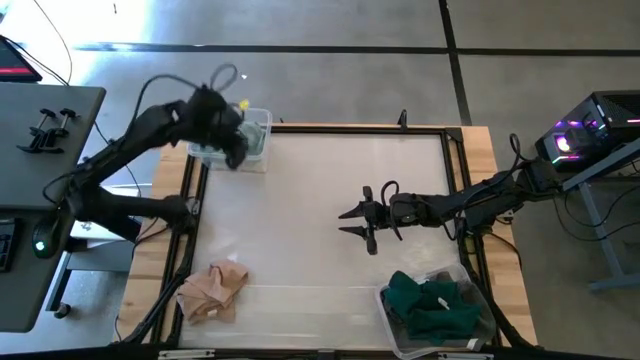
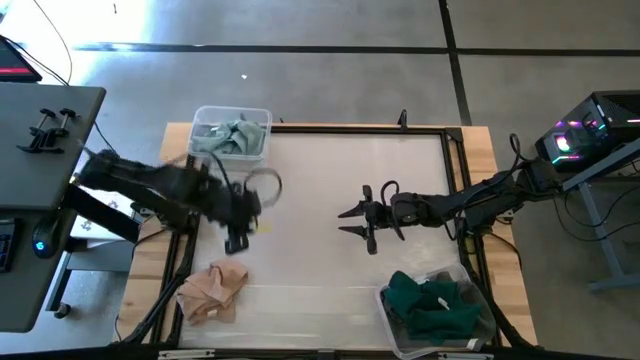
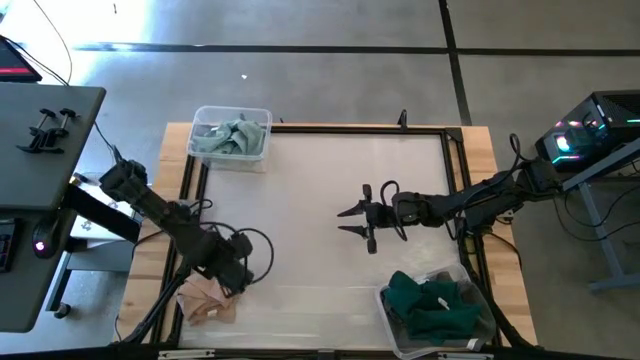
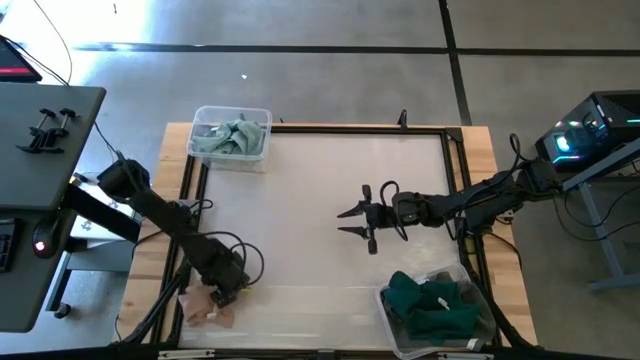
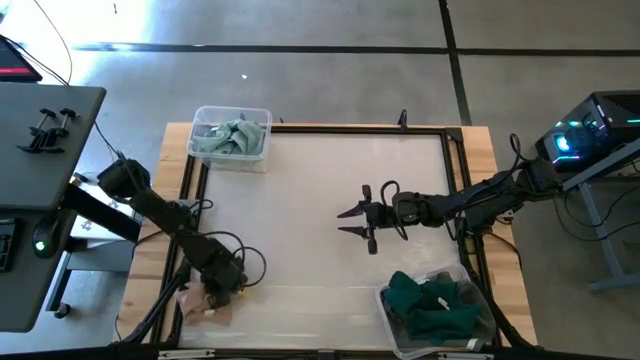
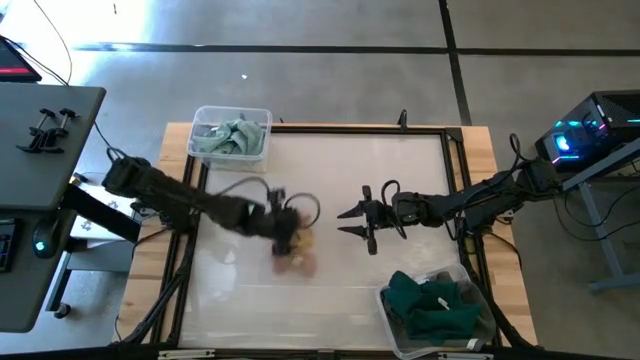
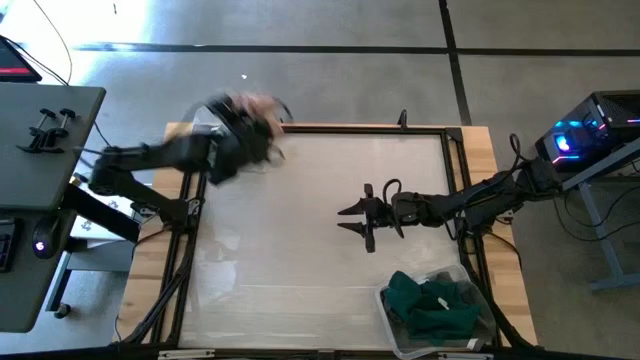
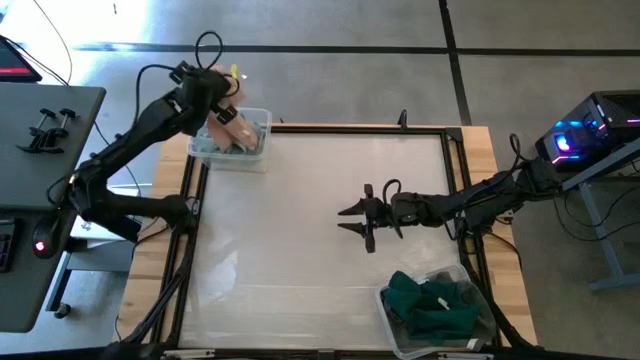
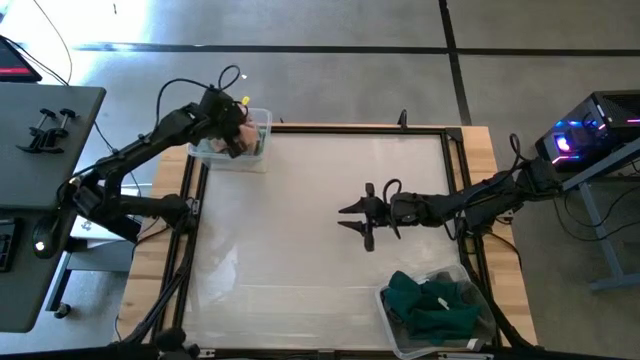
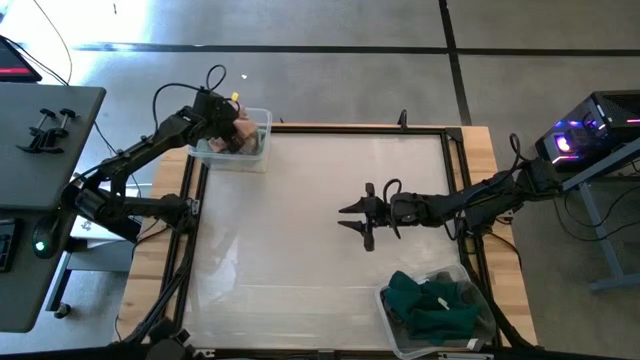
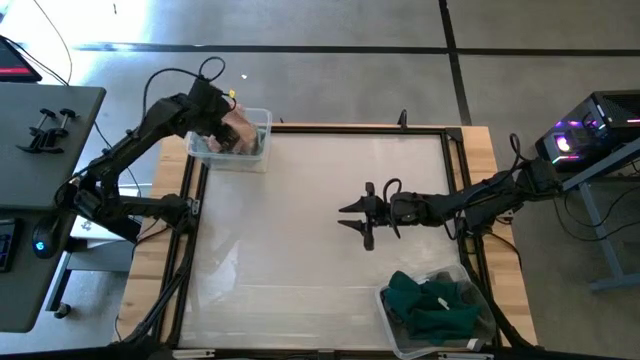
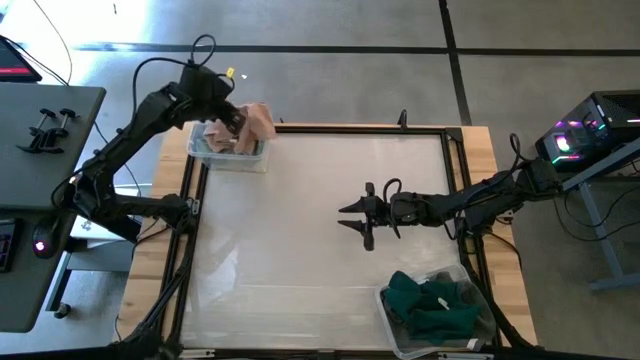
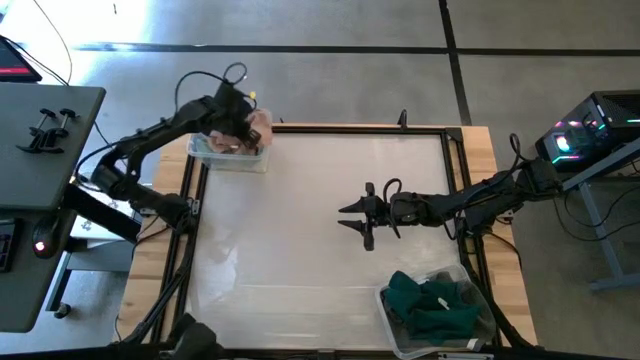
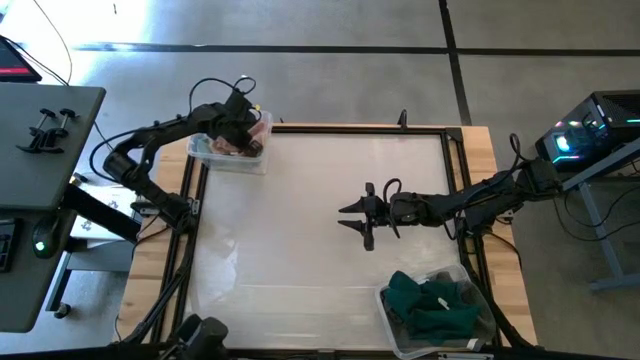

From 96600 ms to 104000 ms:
Task: Sort towels by color in basket
Put the light orange towel into the top transparent bin

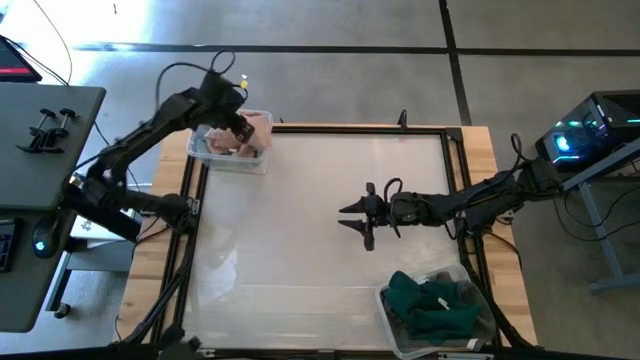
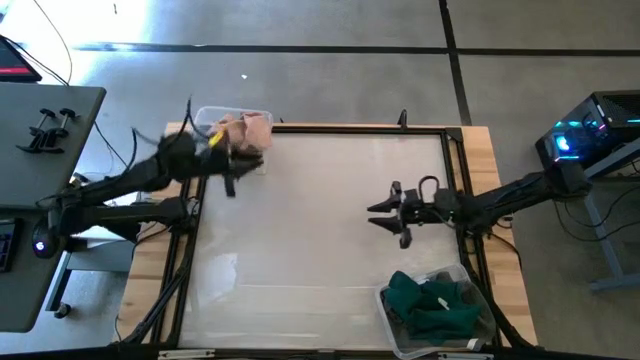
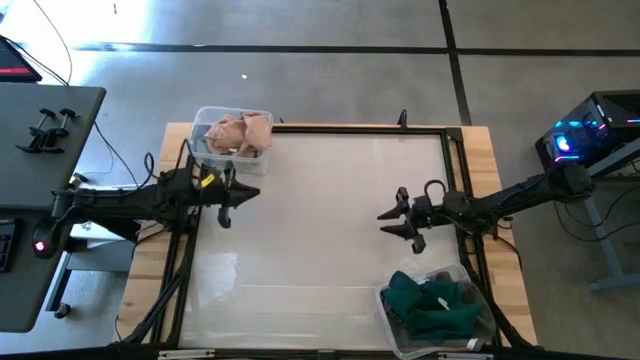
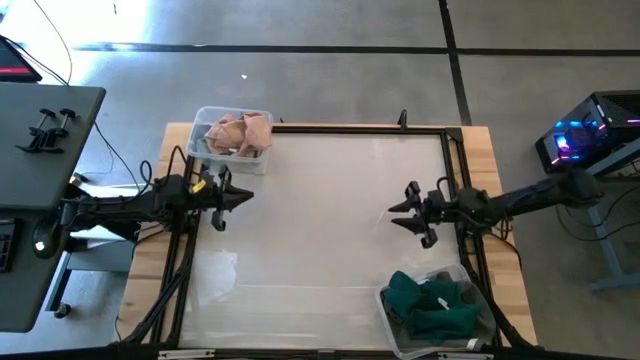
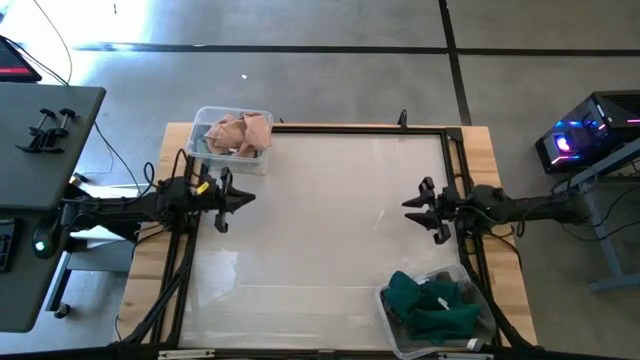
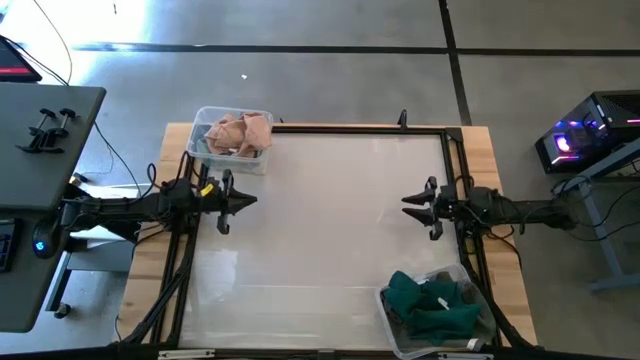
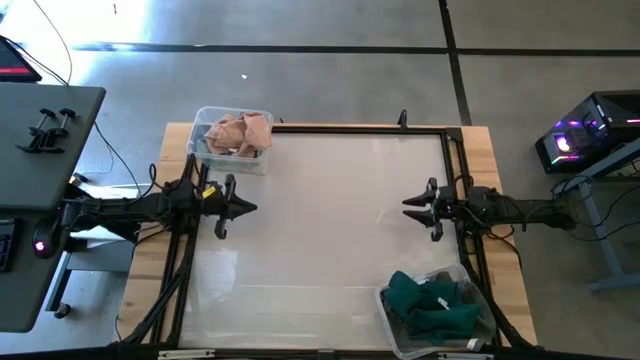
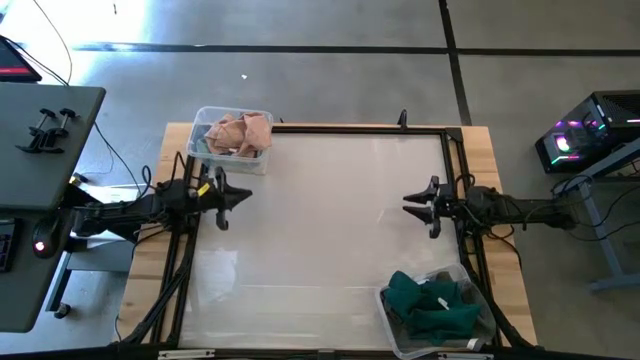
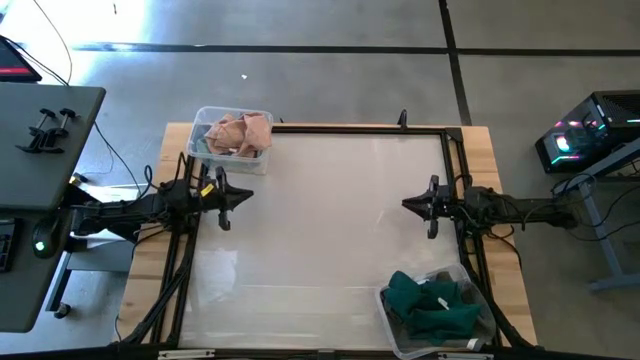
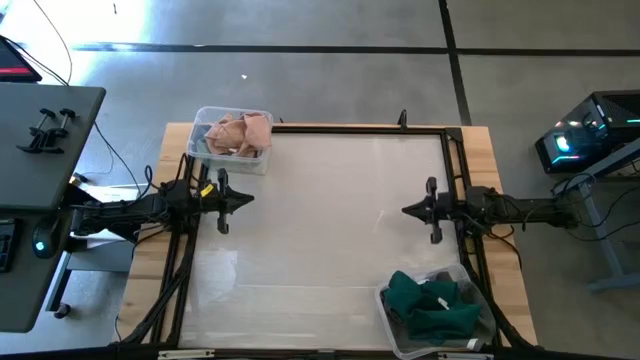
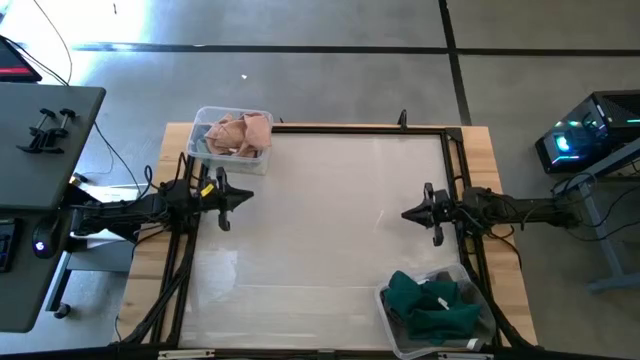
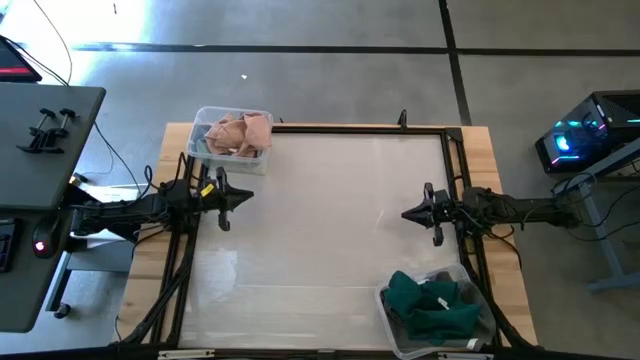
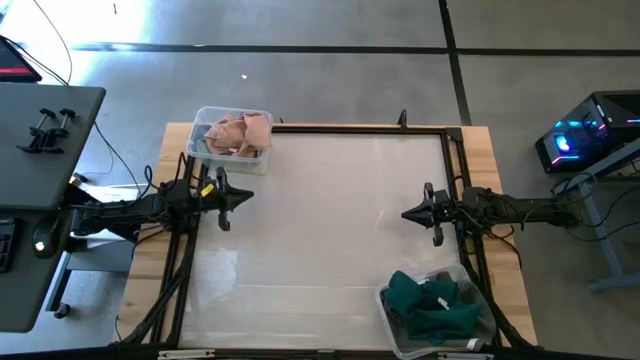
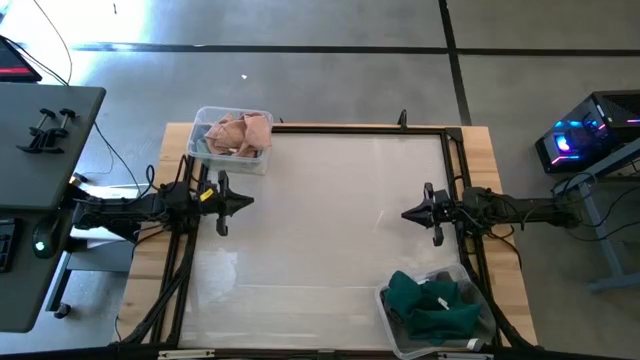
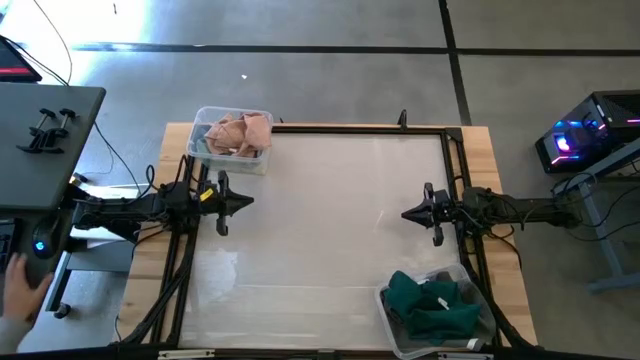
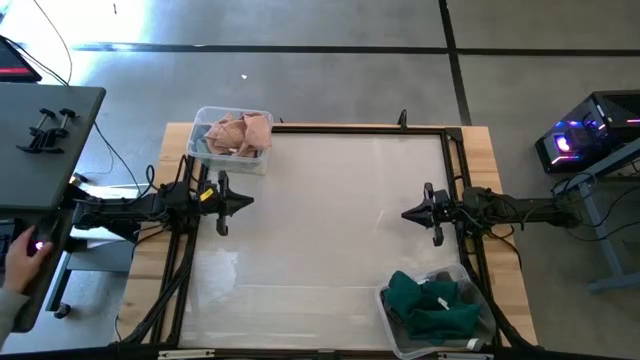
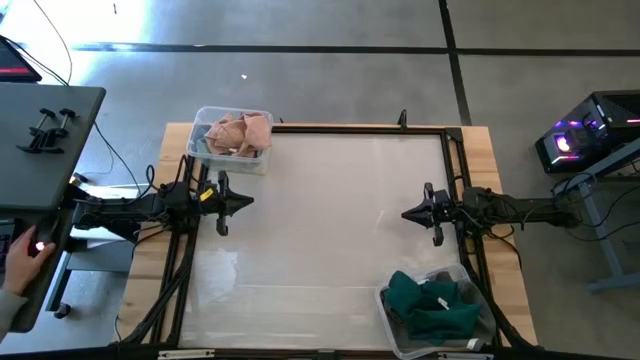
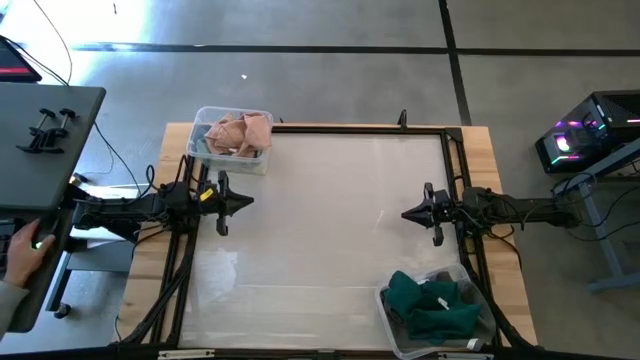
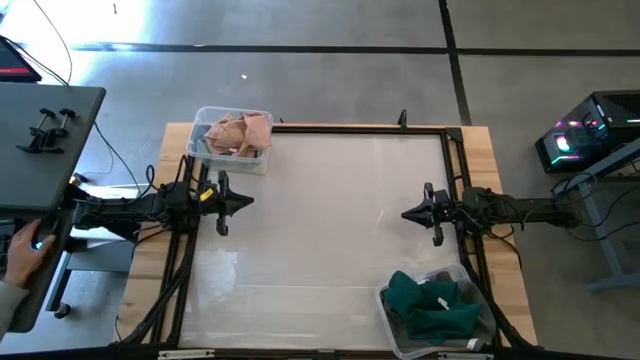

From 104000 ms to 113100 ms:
Return to Home Position

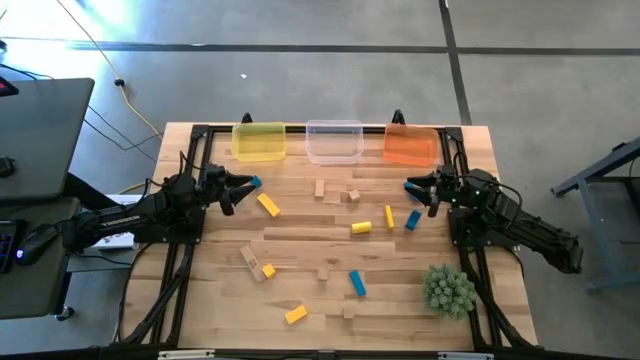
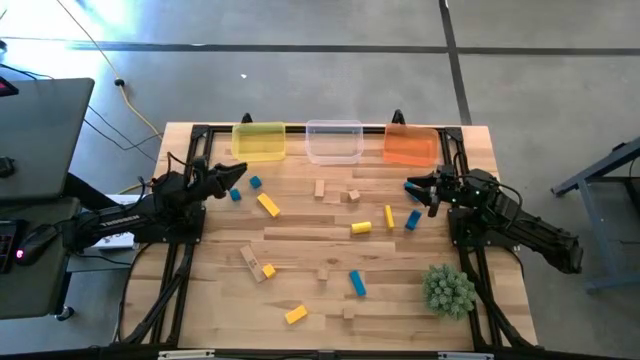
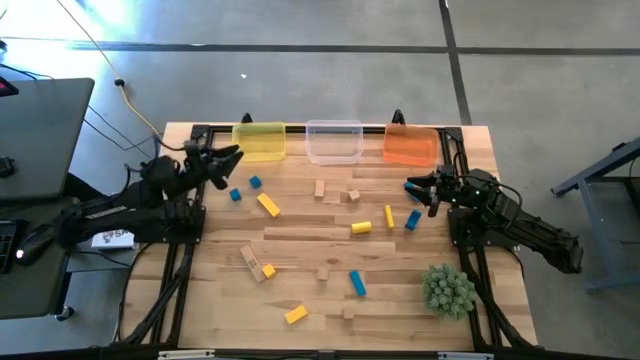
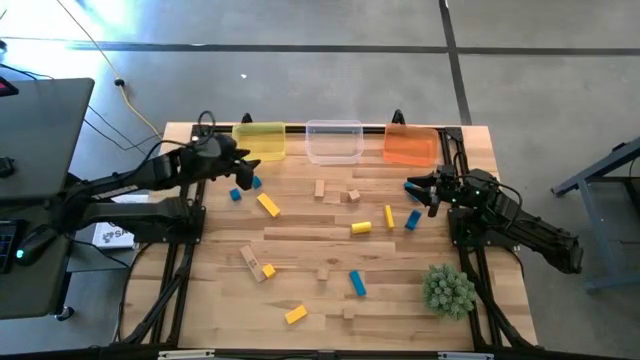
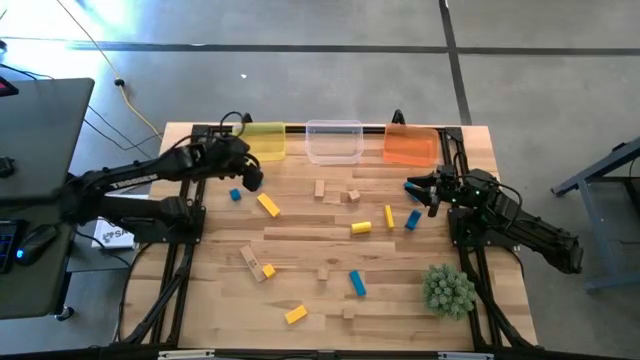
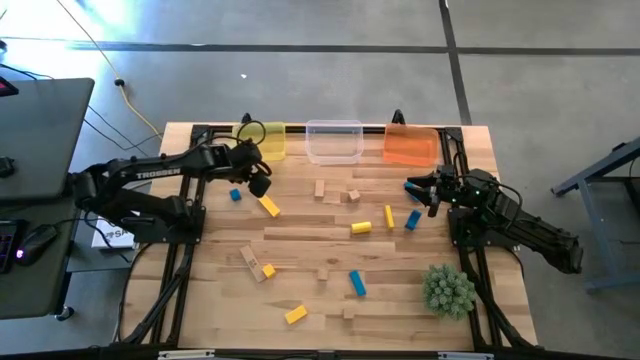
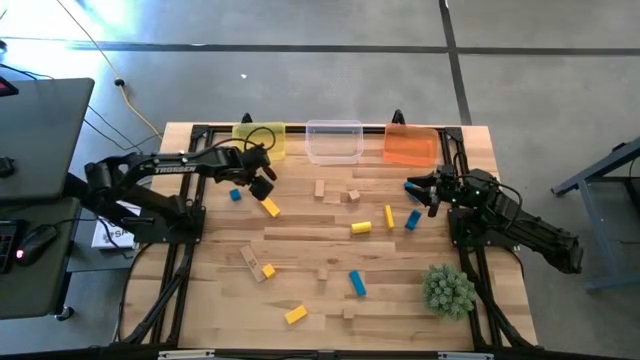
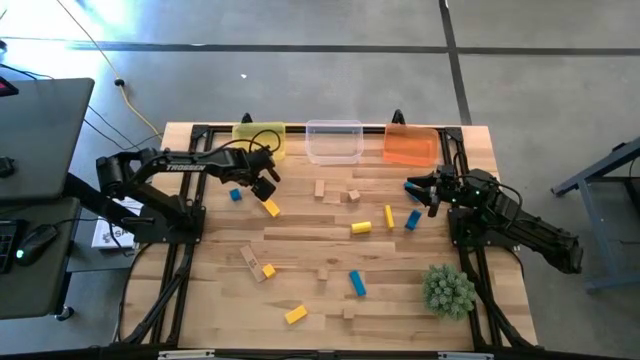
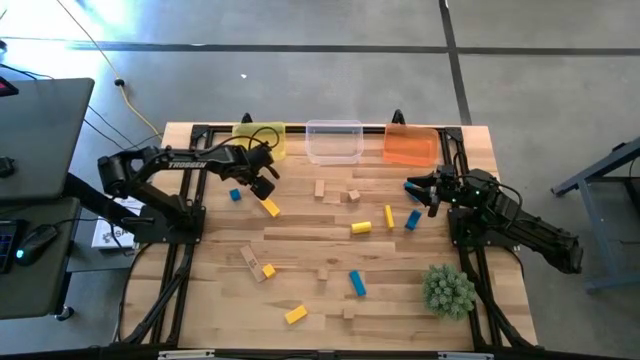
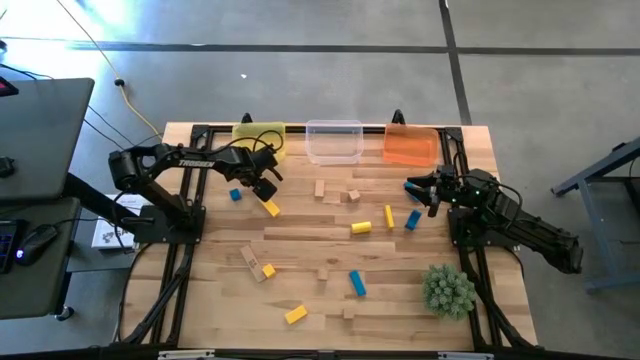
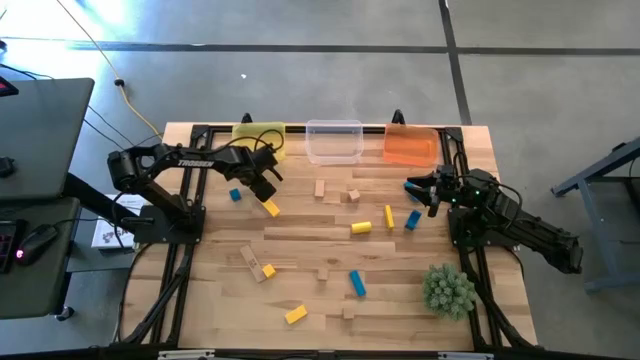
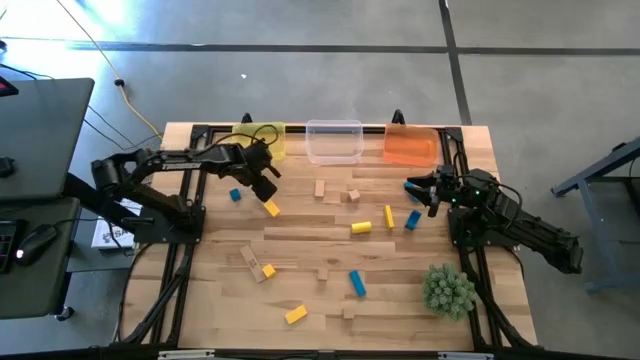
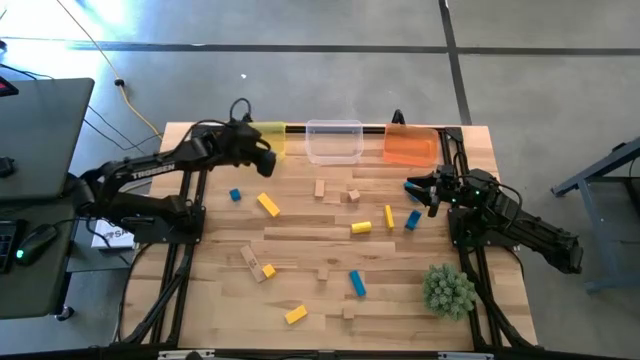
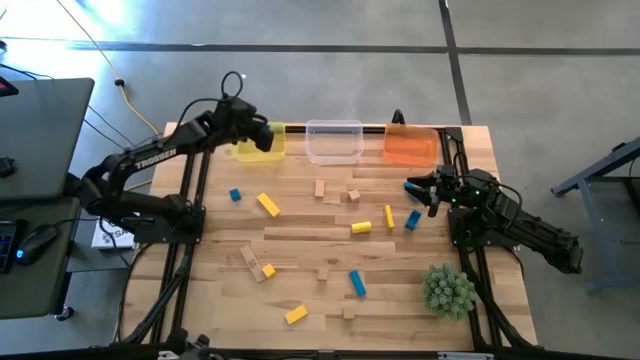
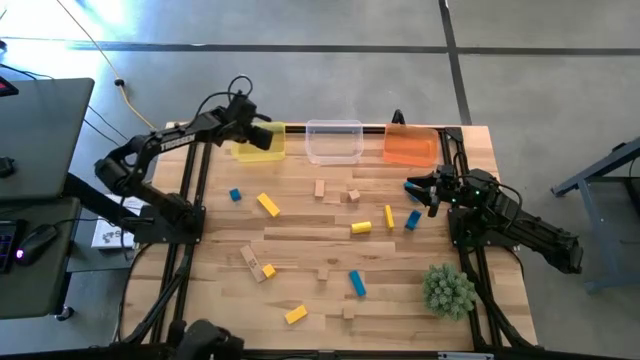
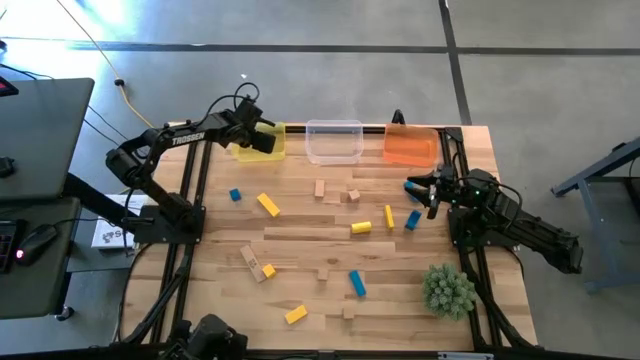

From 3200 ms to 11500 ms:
Task: Sort & place blocks by color
Put the blue block into the yellow bin
